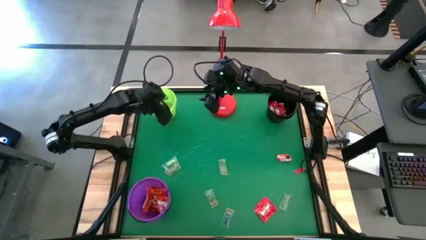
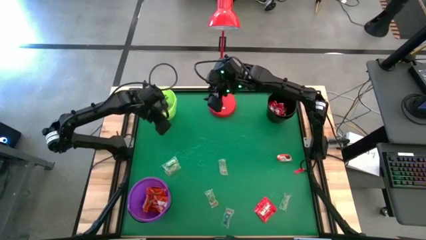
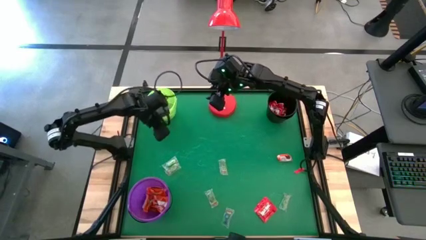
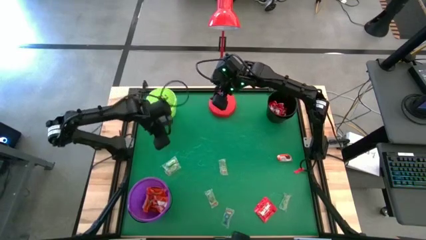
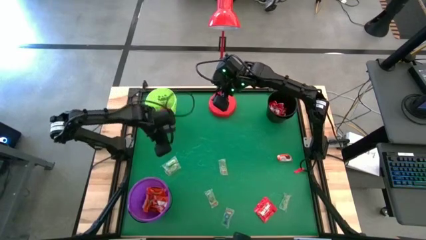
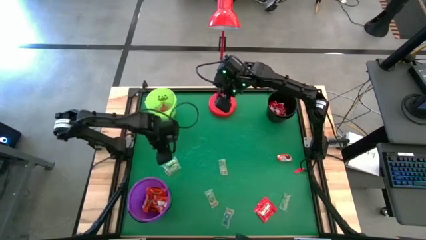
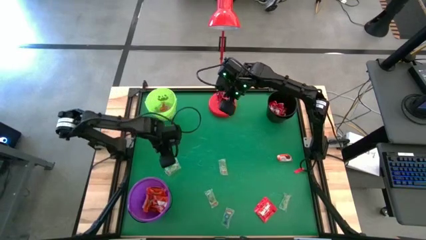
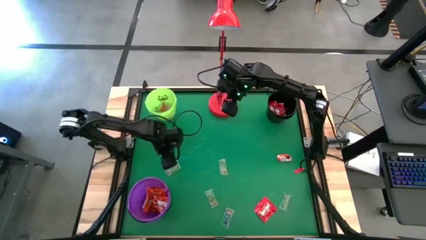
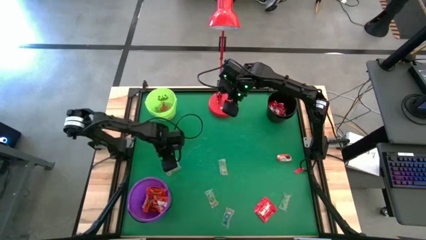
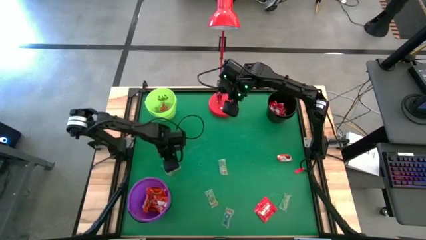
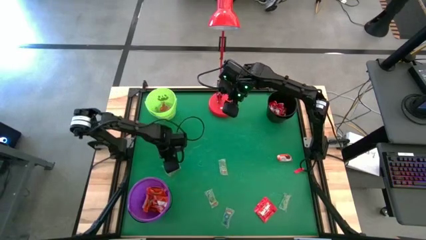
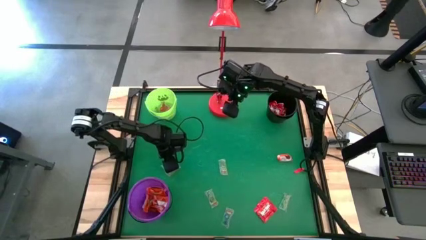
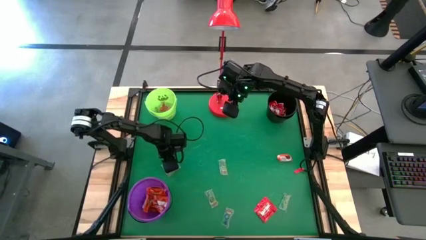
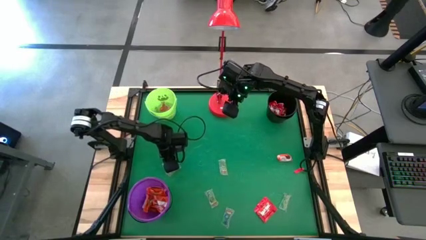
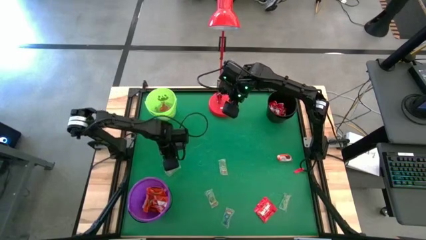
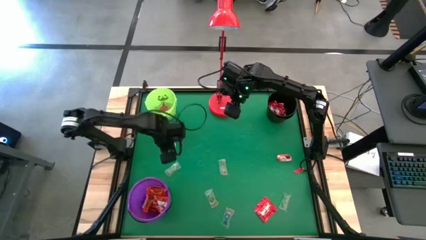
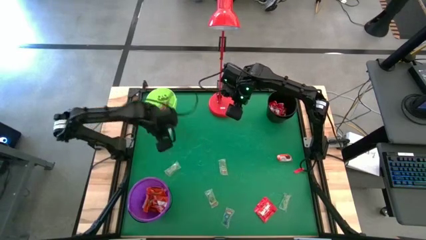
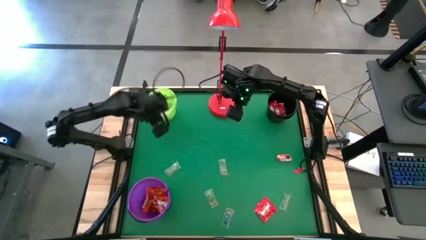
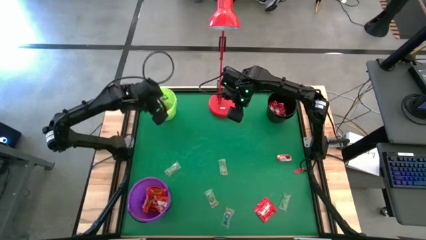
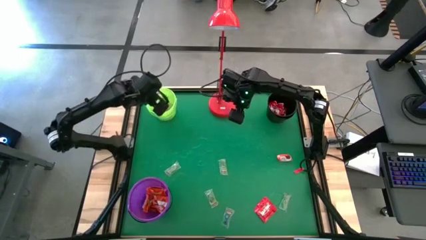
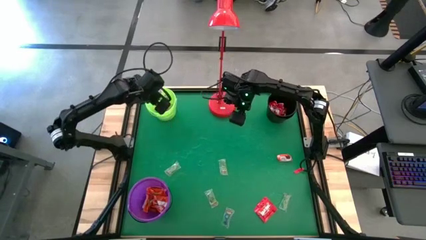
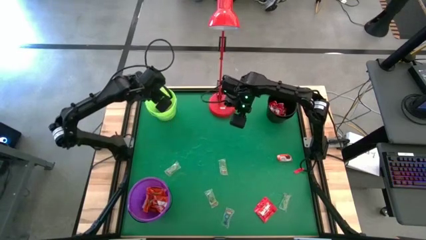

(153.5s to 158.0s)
Task: Sort candy
Put the transparent candy into the green bucket

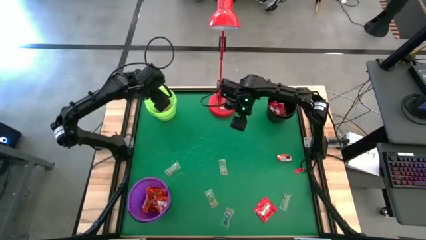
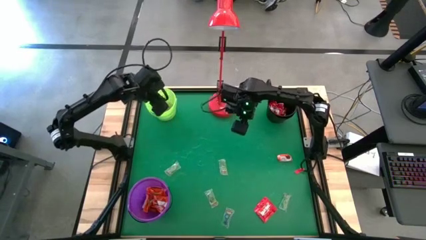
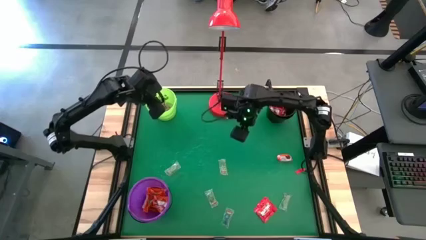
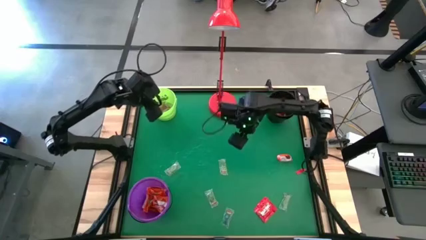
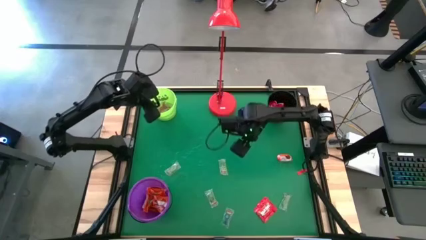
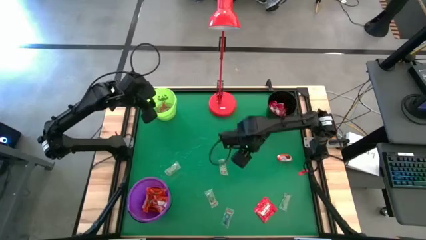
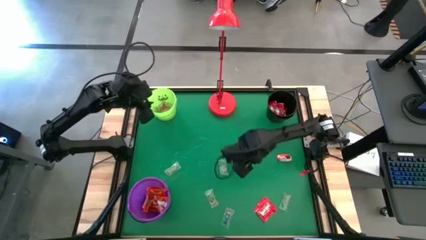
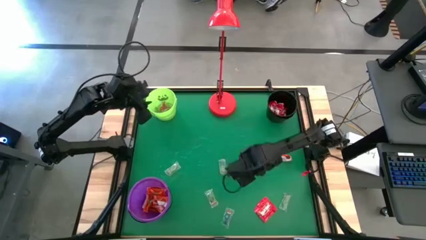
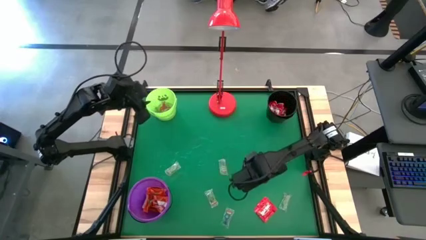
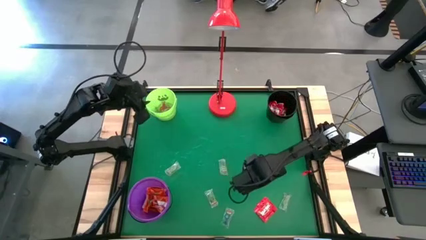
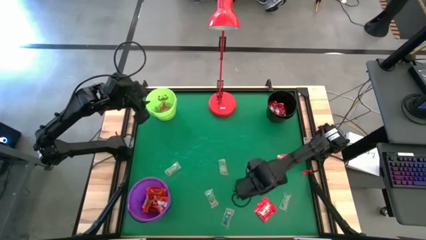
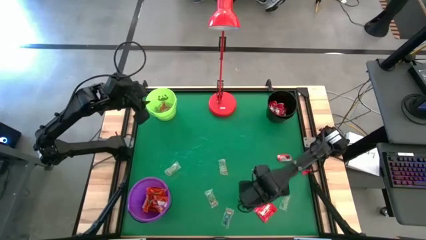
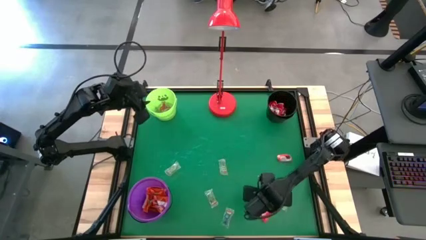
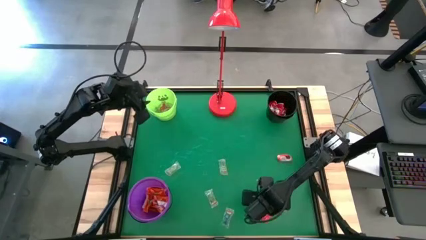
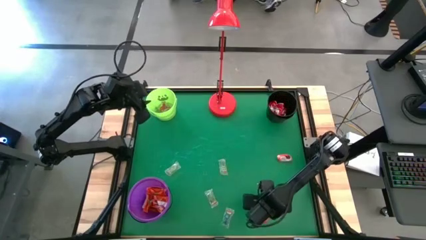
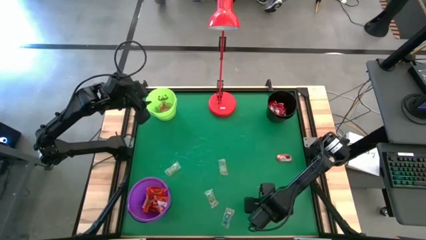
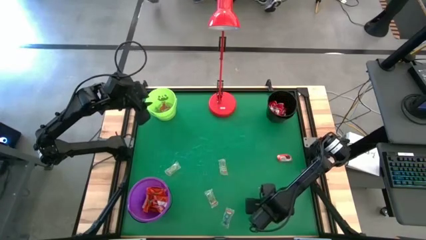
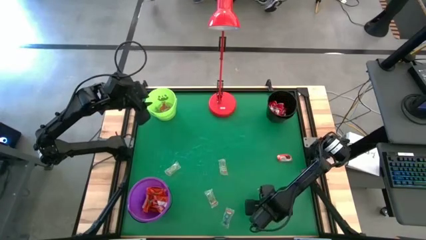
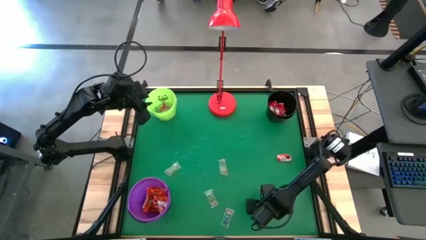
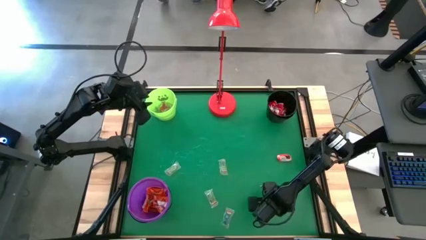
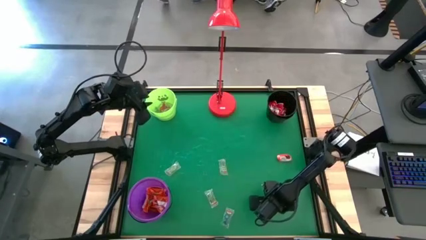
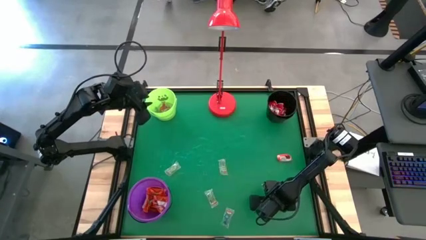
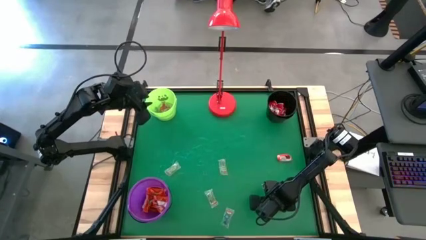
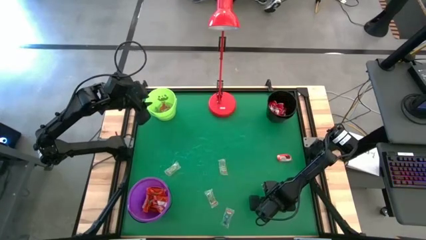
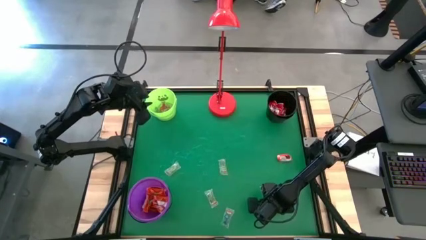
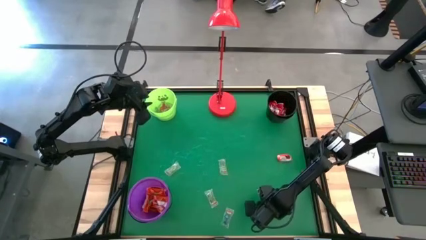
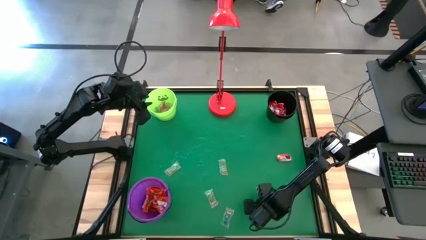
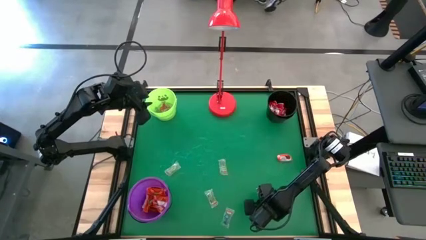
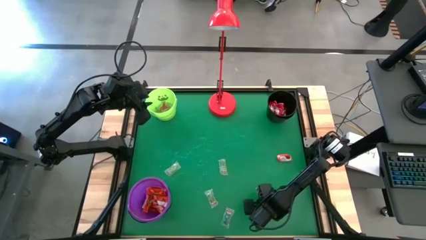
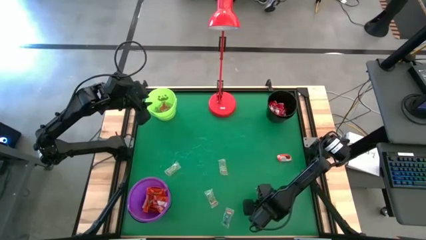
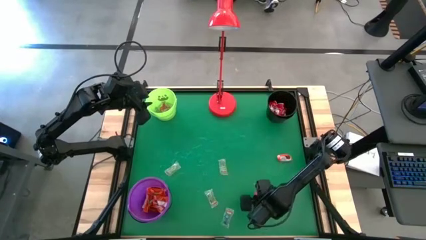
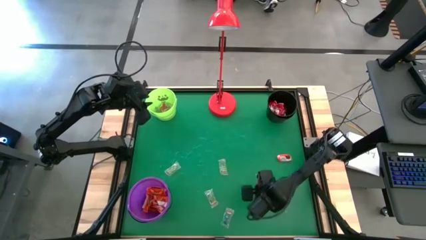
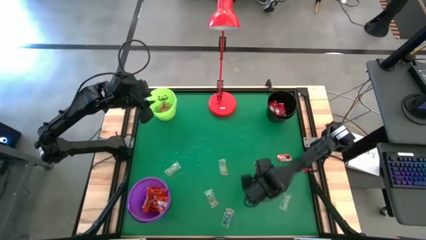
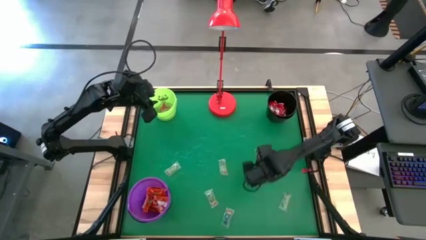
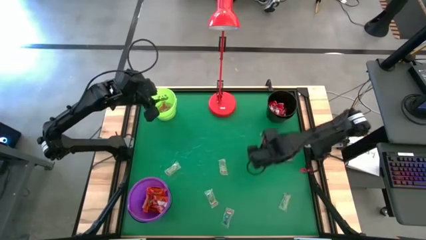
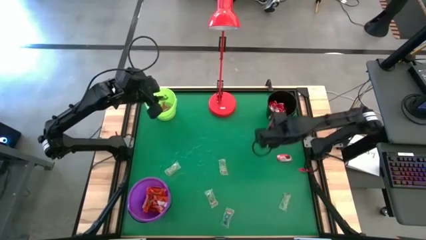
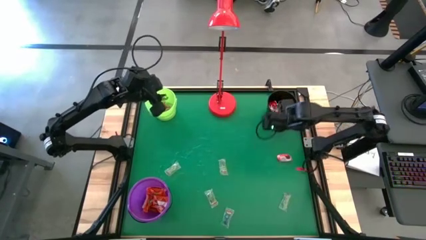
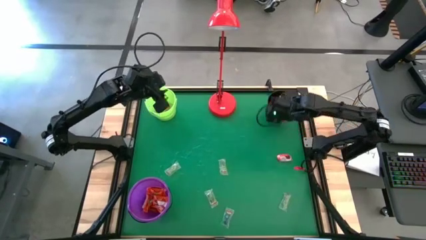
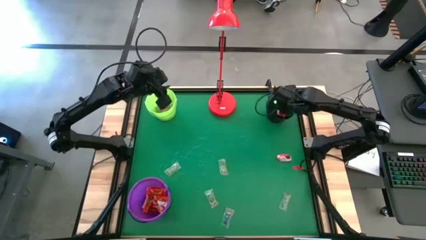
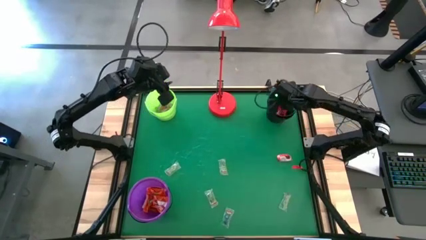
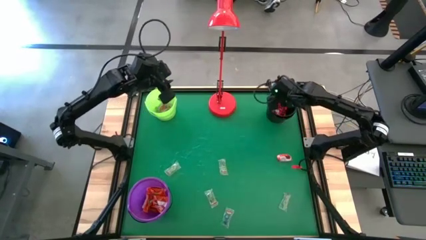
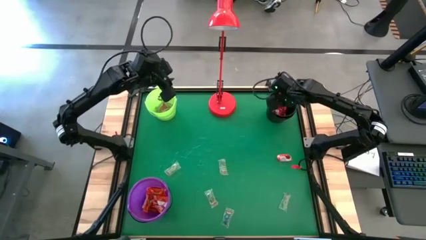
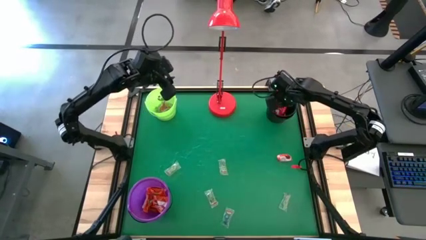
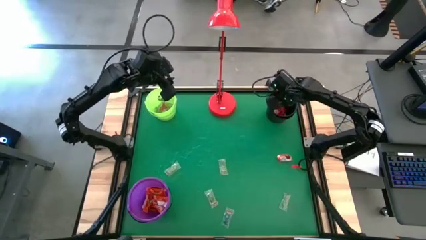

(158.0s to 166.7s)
Put the red candy into the black bucket
